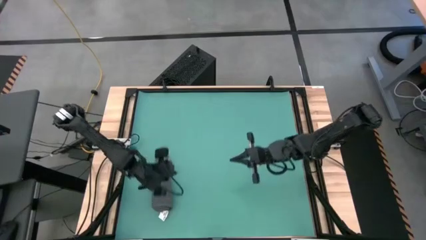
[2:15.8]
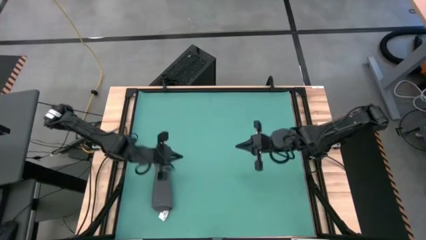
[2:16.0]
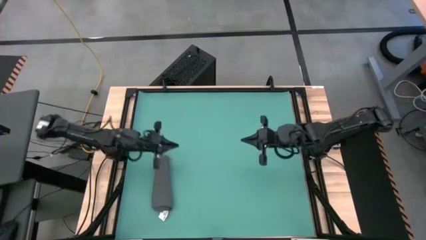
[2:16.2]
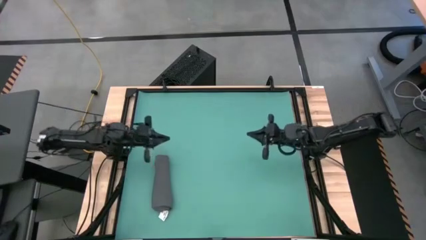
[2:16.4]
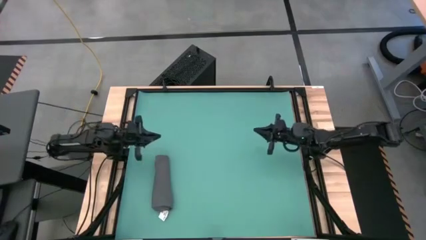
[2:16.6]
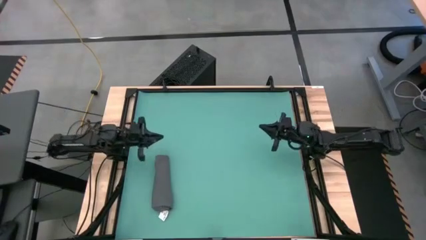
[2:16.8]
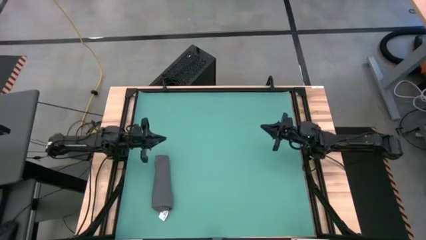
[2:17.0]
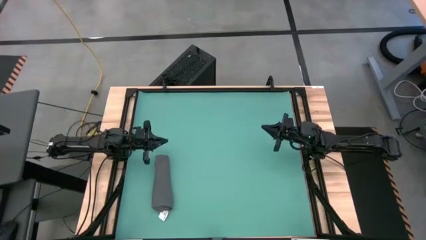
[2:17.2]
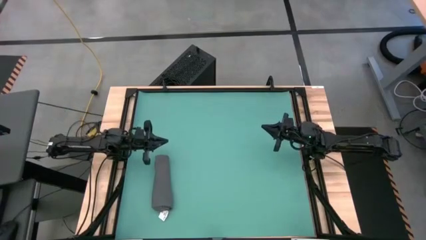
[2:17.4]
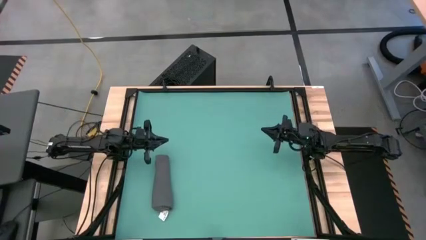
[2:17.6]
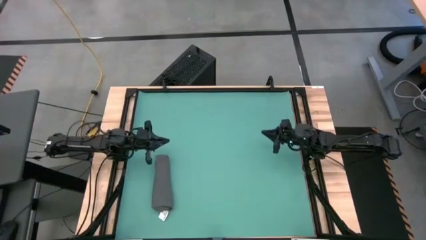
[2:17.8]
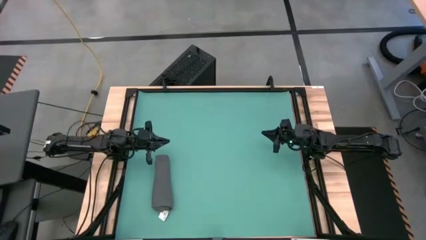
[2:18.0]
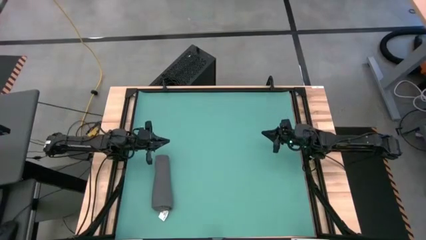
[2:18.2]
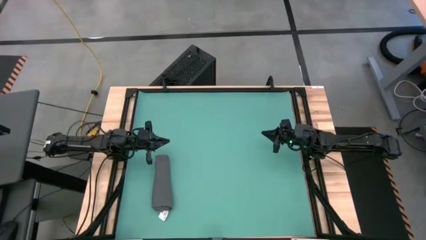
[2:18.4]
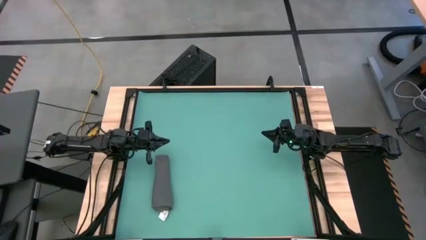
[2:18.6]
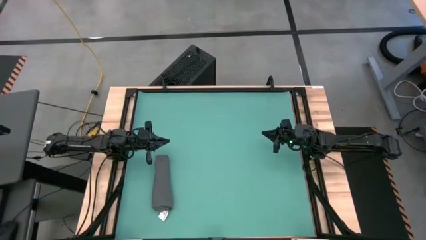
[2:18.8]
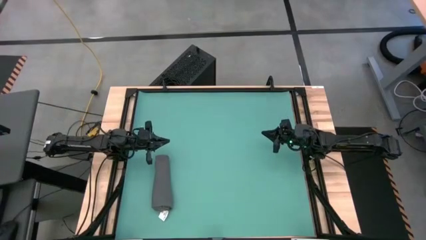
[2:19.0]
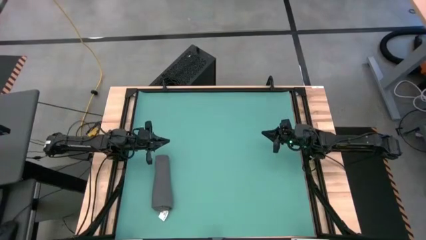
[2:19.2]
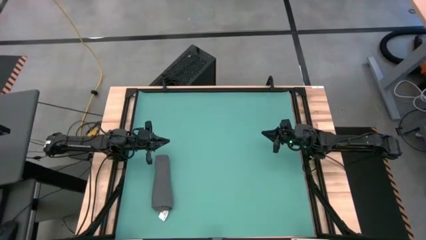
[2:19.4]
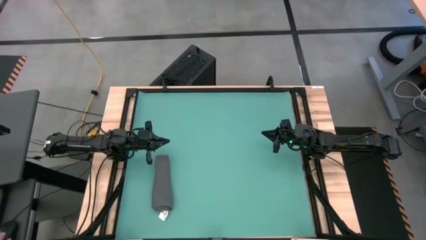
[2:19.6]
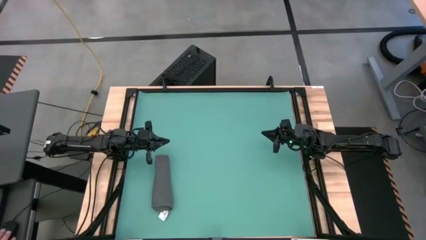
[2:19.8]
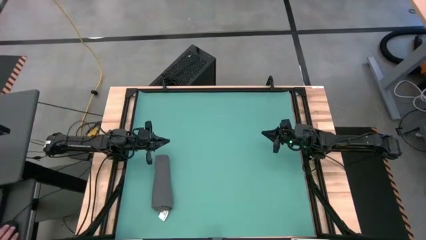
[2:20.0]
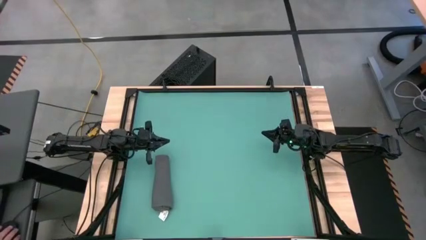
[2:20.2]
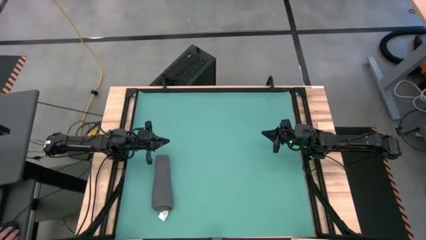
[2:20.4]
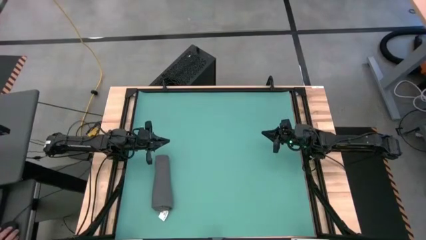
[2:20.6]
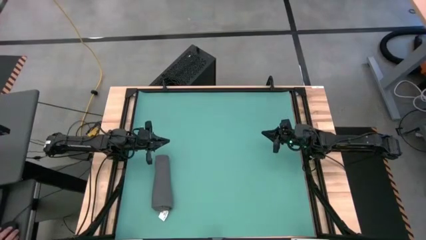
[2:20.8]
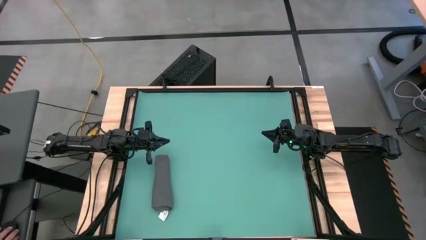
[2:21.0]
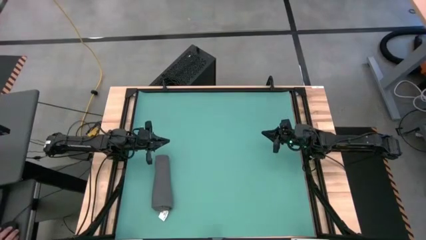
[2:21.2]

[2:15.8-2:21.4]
Task: Roll towel
Return to Home Position

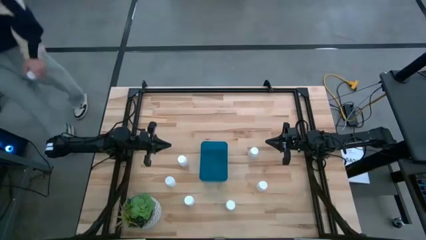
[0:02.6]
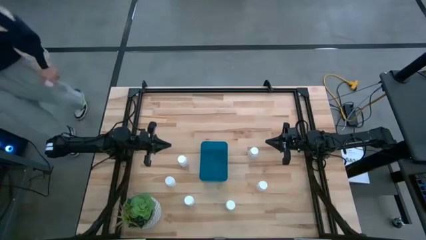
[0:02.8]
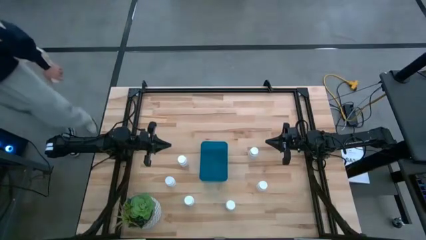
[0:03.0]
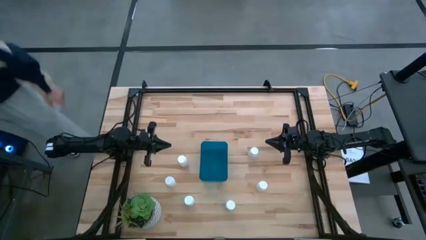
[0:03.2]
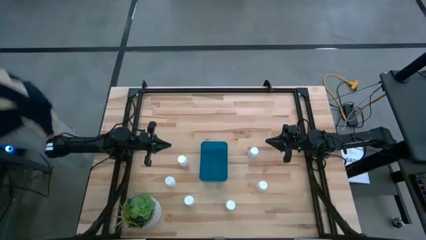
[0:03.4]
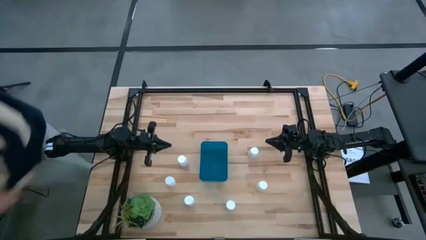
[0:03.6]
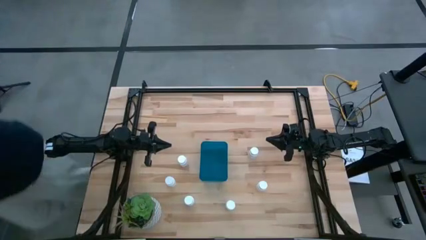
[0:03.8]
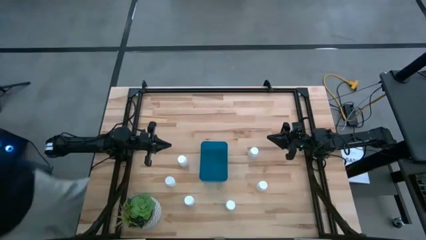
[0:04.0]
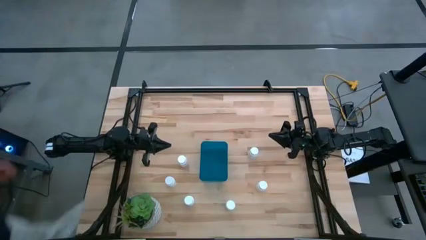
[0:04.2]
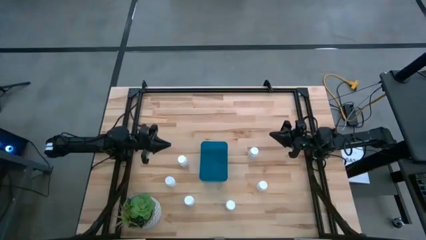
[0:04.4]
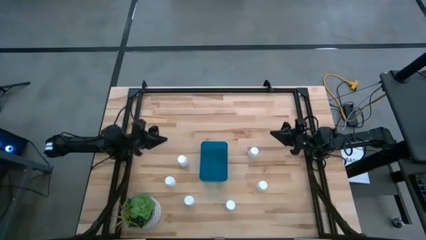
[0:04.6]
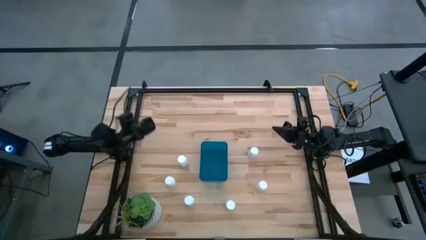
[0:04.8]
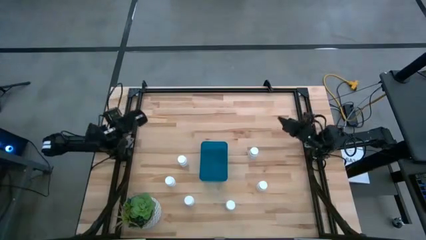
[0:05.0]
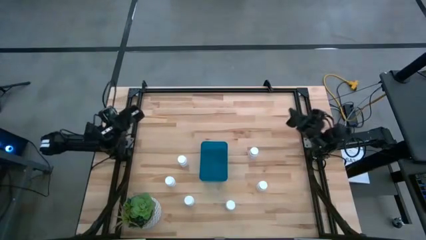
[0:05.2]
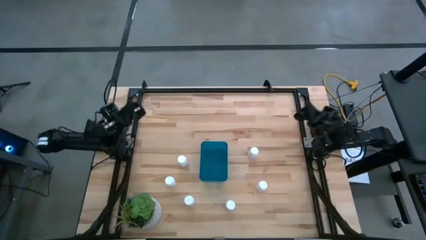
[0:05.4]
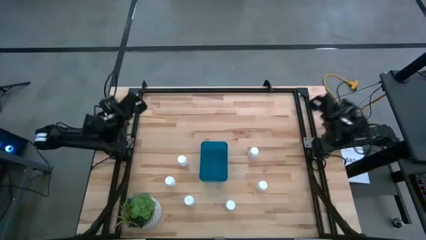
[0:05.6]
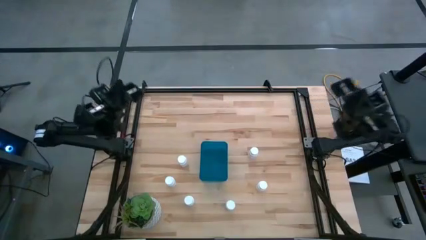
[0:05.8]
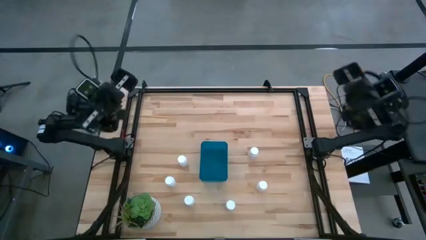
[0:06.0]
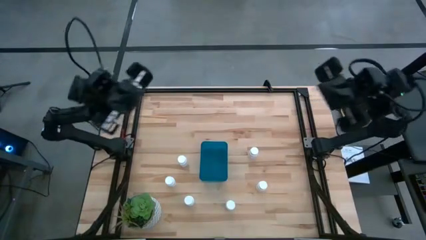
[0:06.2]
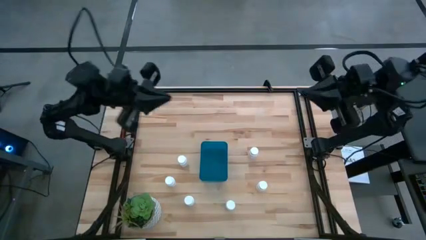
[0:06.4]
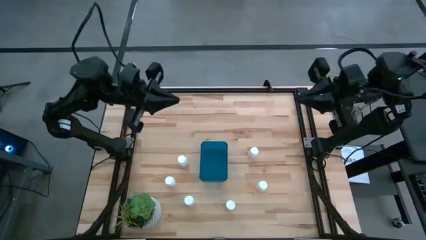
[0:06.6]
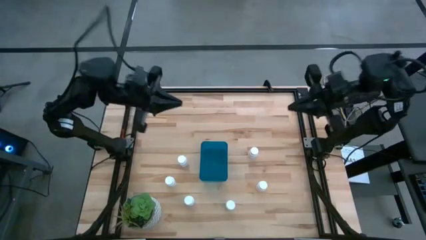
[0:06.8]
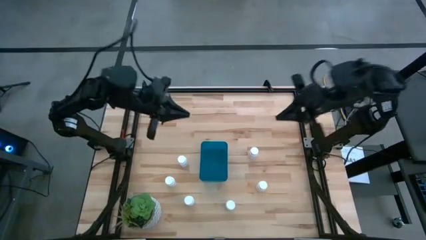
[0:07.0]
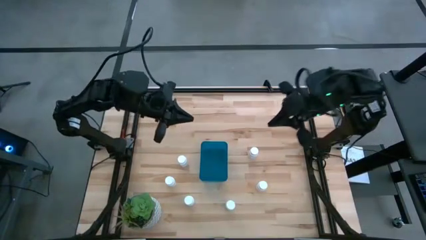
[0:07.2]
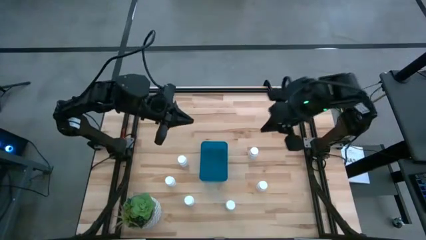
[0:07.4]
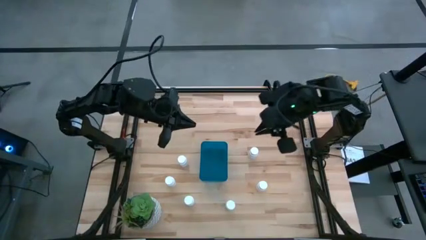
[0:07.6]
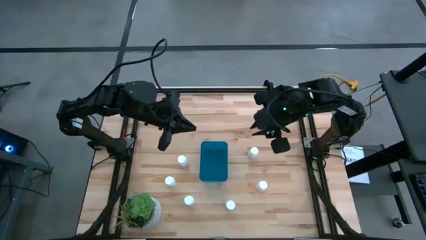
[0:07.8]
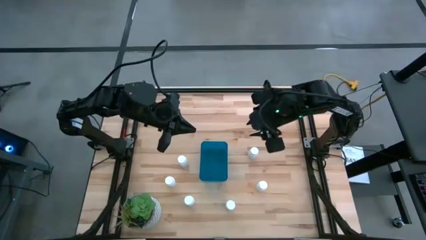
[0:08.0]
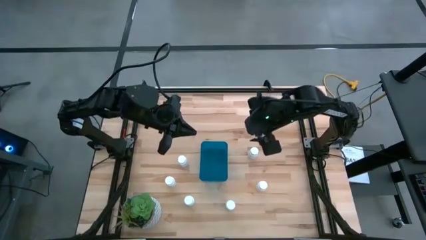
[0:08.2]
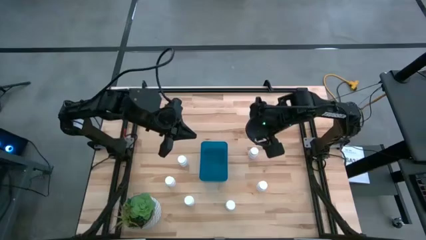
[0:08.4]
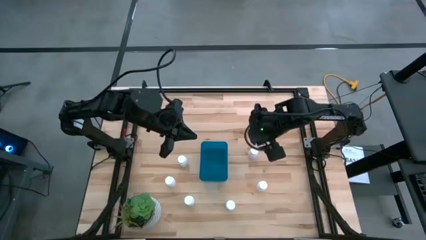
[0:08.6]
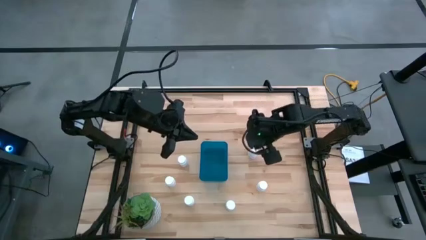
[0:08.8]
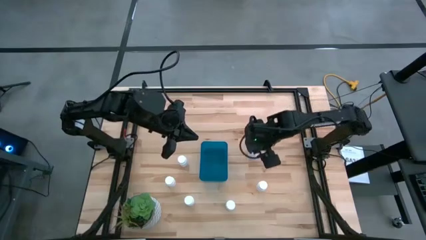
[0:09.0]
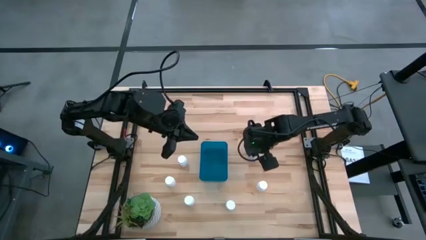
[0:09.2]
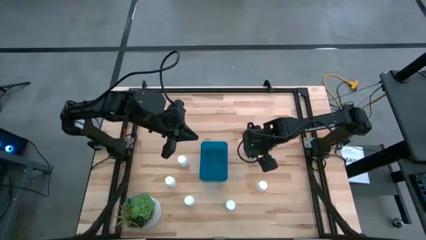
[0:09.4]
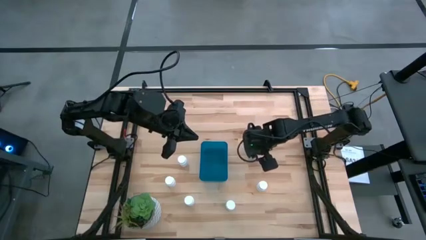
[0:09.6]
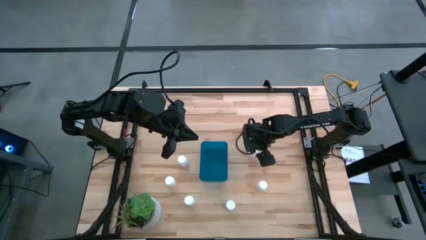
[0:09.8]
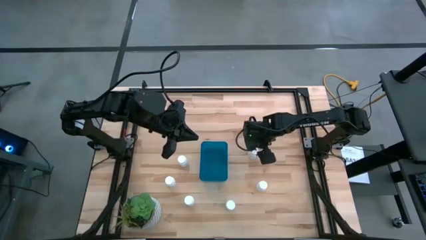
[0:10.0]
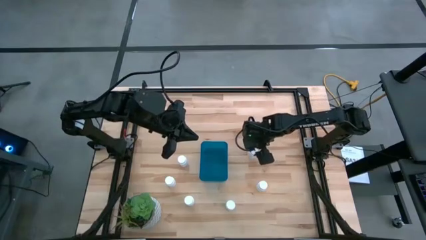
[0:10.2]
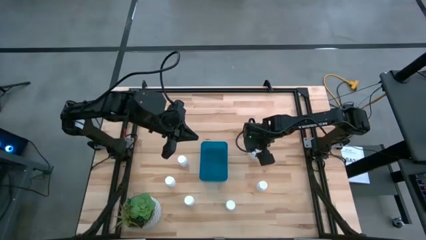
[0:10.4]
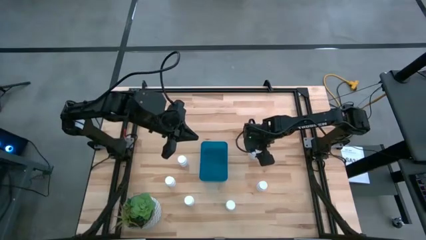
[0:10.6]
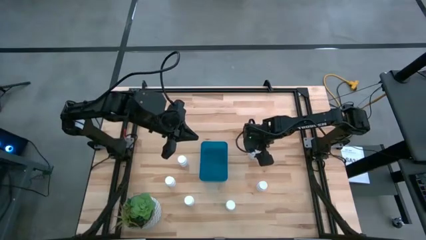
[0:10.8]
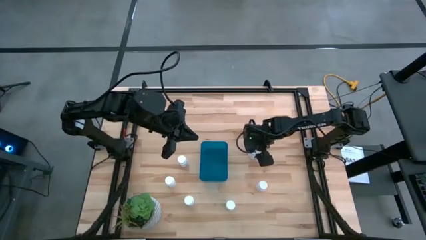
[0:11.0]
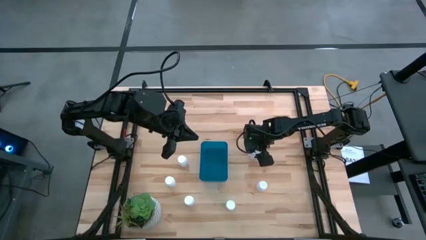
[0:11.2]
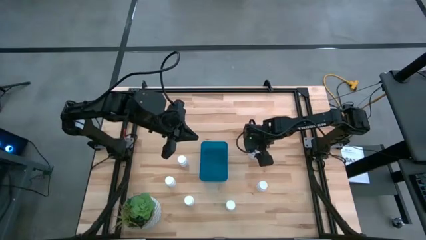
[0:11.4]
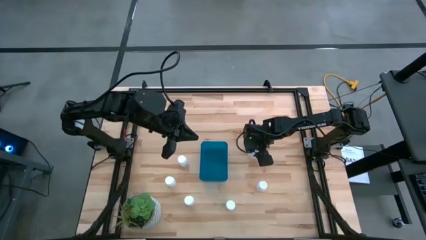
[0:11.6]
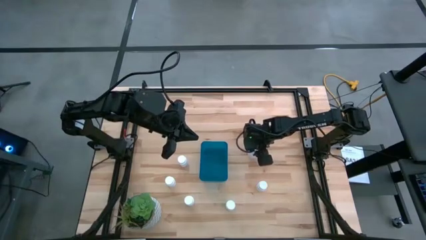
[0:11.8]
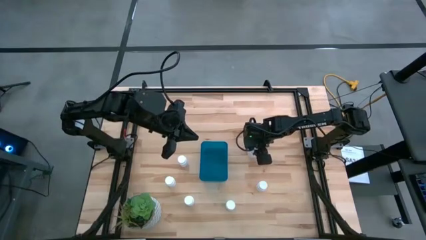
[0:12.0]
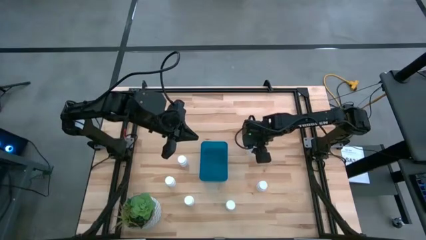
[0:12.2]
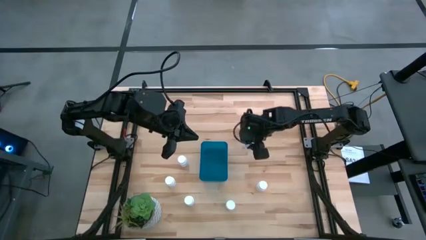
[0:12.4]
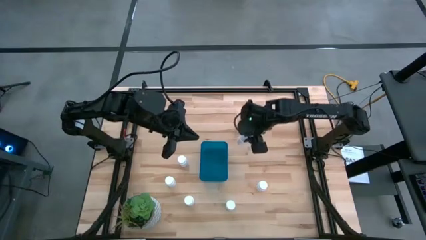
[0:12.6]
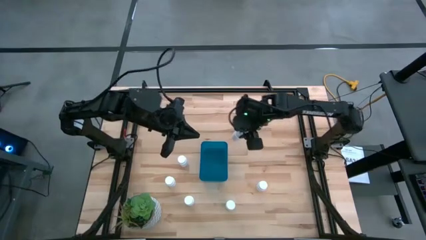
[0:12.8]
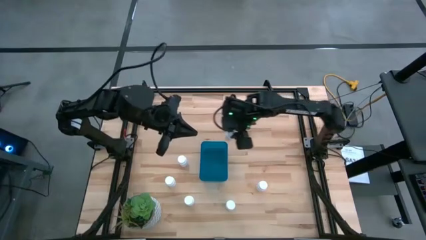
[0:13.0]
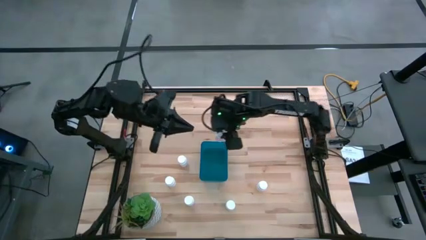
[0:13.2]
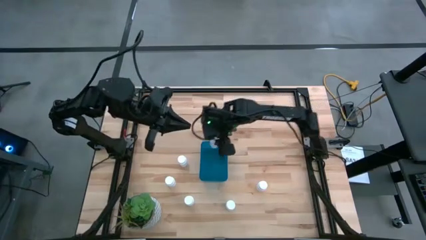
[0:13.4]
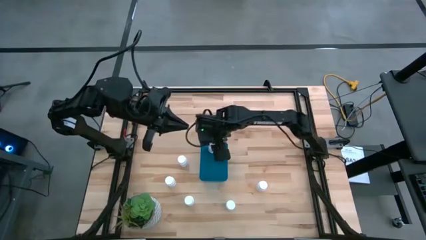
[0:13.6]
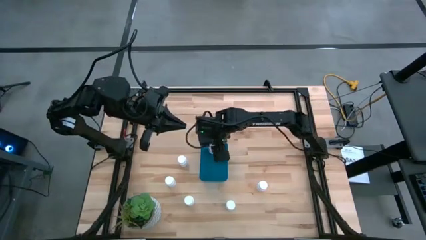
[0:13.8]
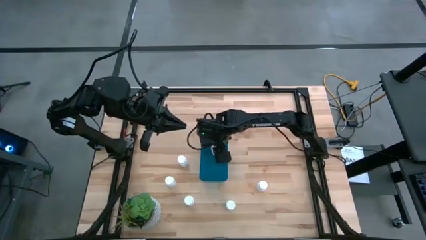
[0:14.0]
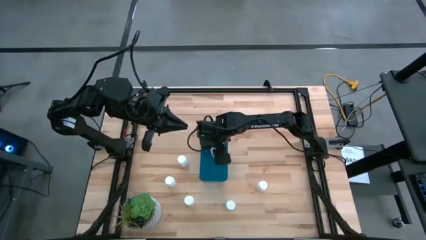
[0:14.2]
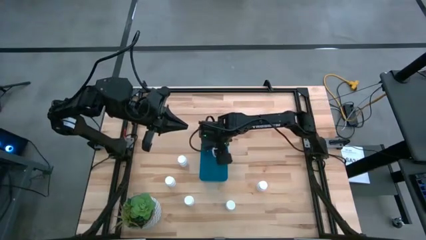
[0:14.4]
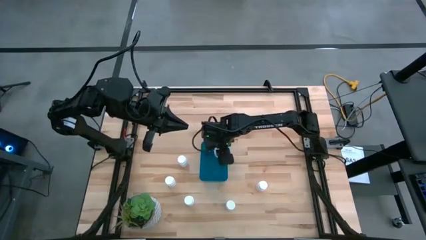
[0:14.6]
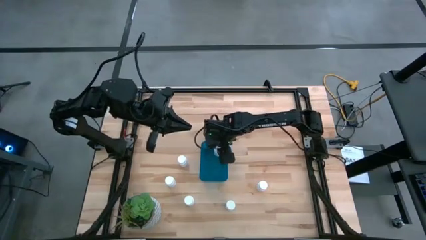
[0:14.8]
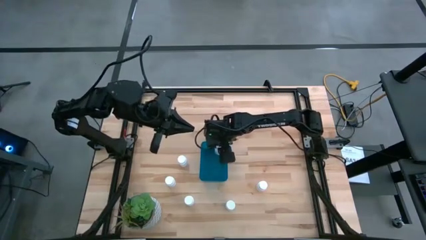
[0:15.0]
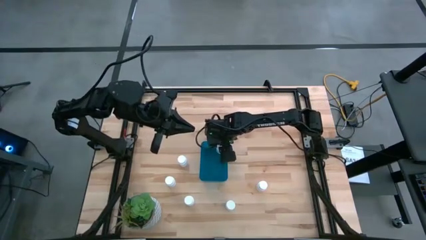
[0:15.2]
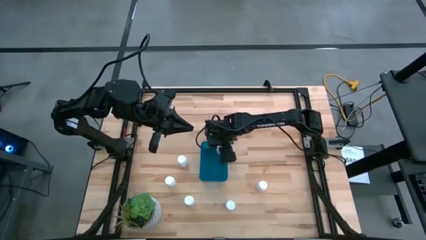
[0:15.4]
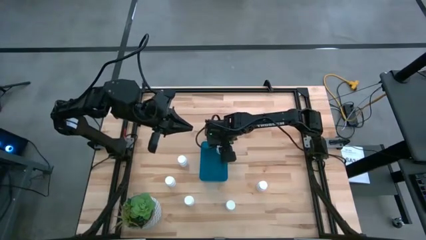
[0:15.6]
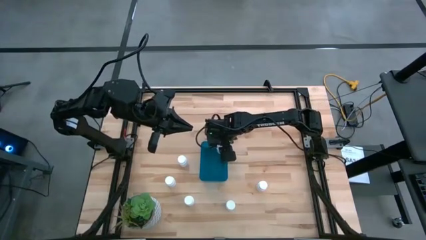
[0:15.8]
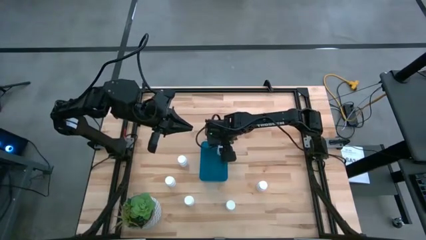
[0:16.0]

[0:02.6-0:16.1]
Task: Pick and place pill bottles into a basket
Put the pill bottle into the bin
